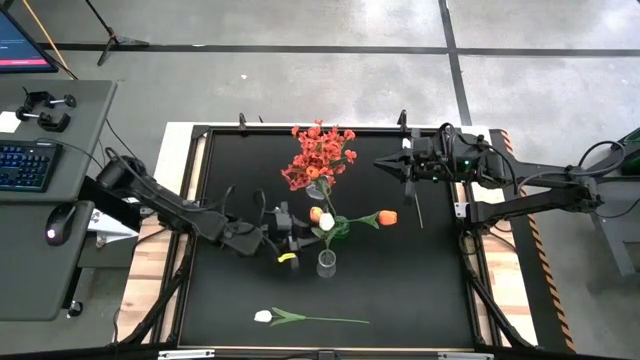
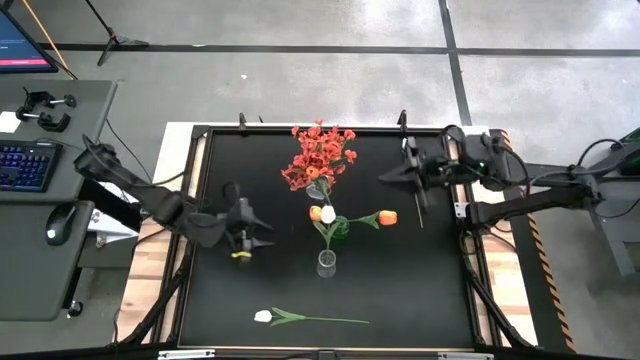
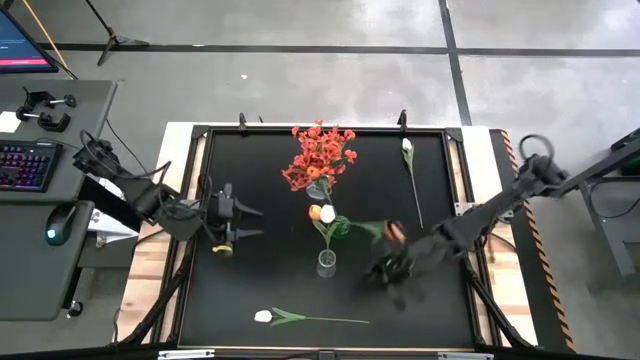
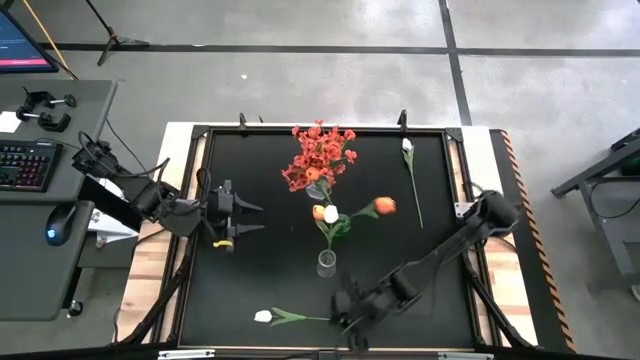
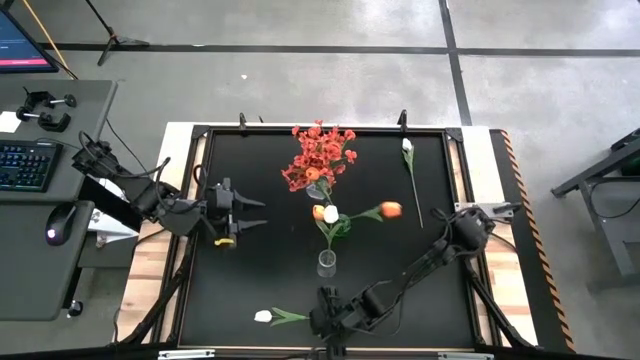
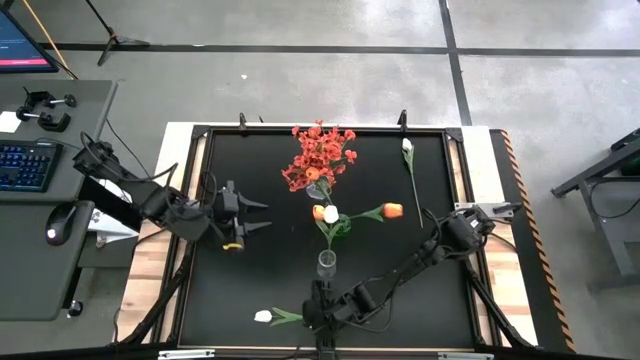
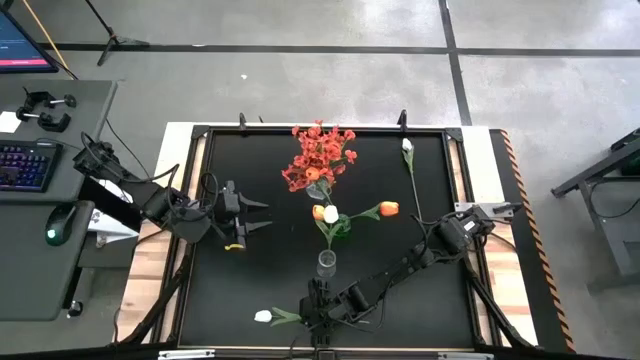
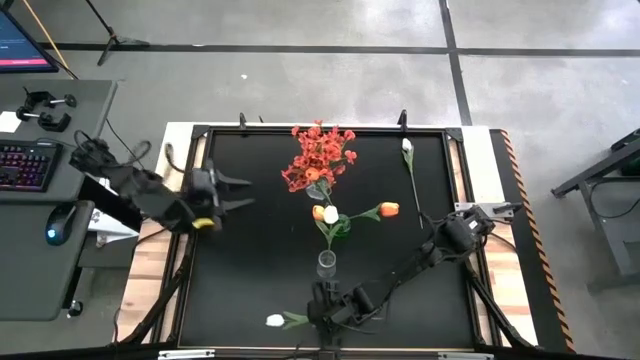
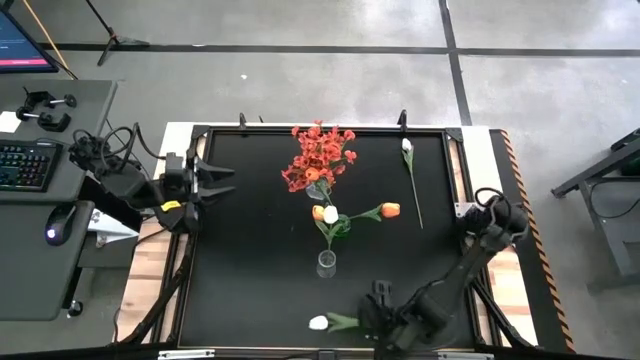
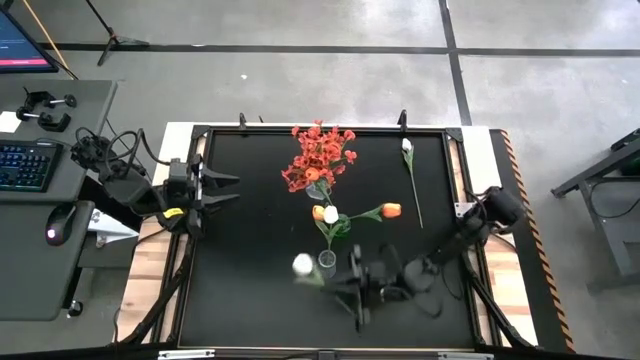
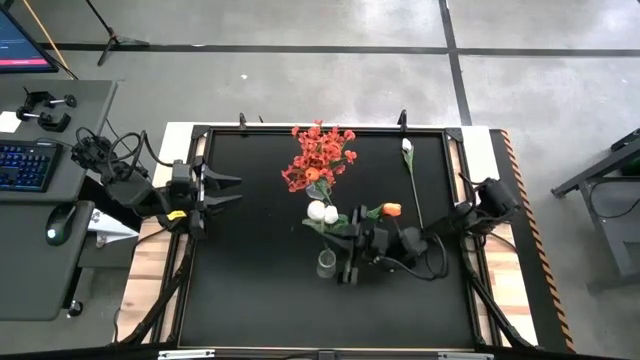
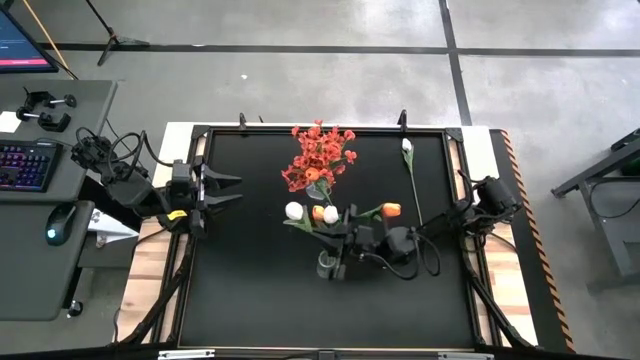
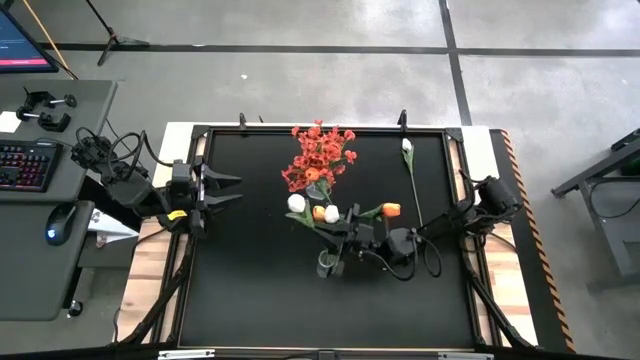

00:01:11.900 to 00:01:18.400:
Task: Sort flowers into vase by color
Put the bottom white tulip into bottom transparent flower vase

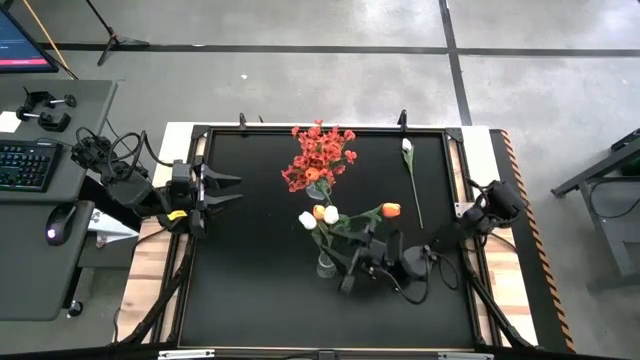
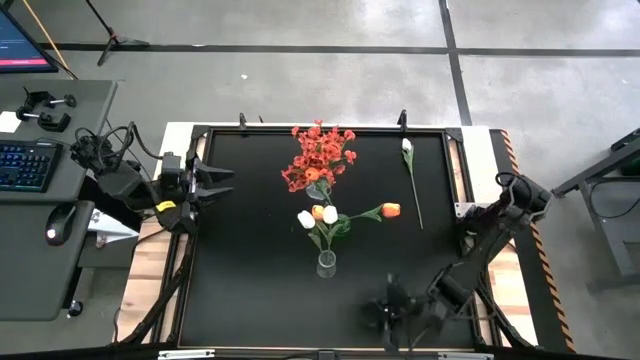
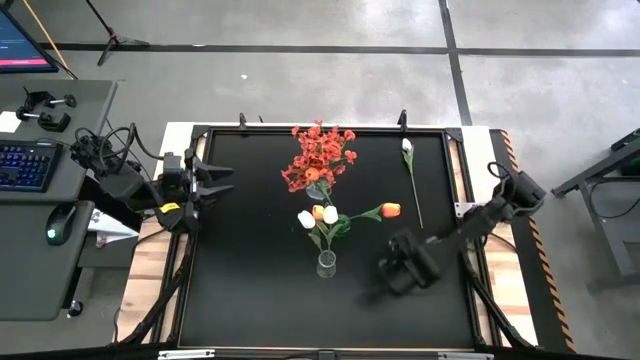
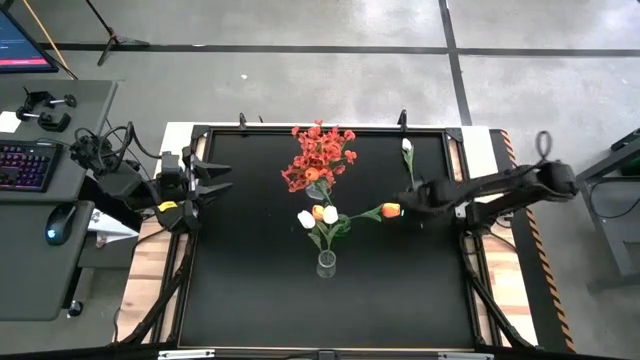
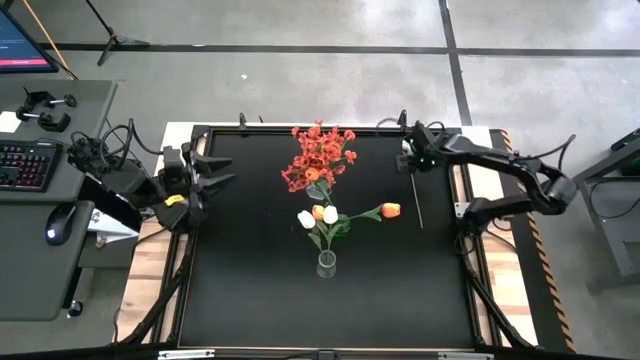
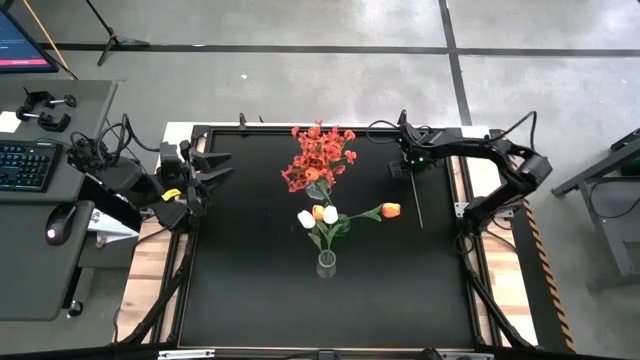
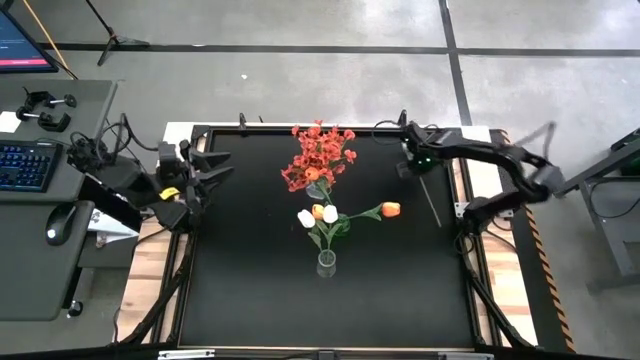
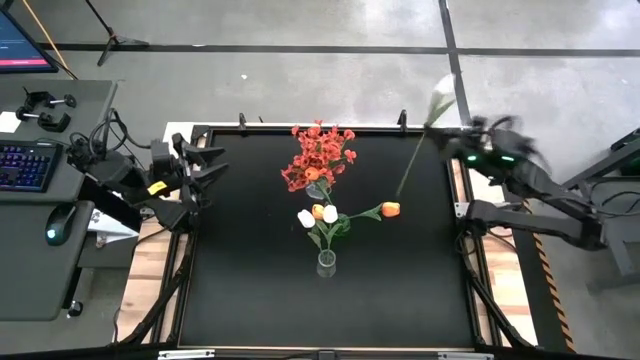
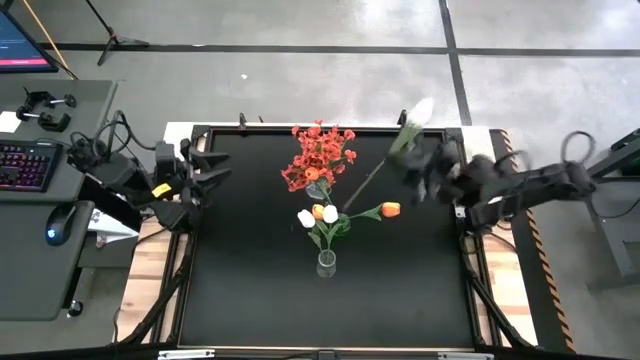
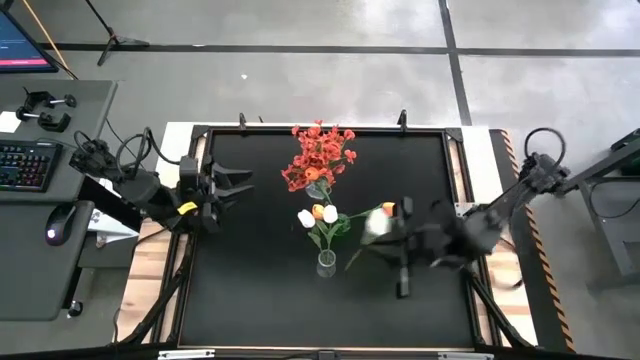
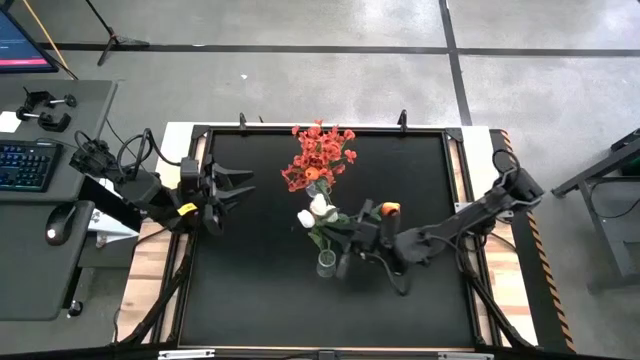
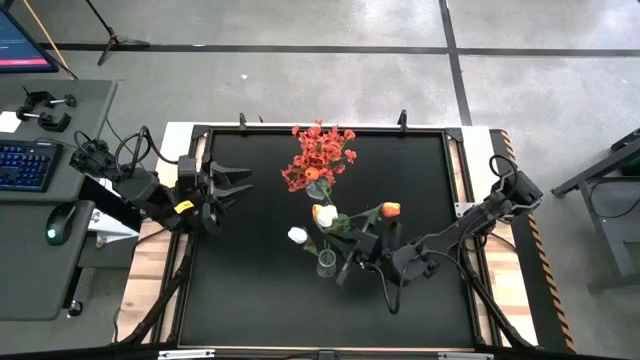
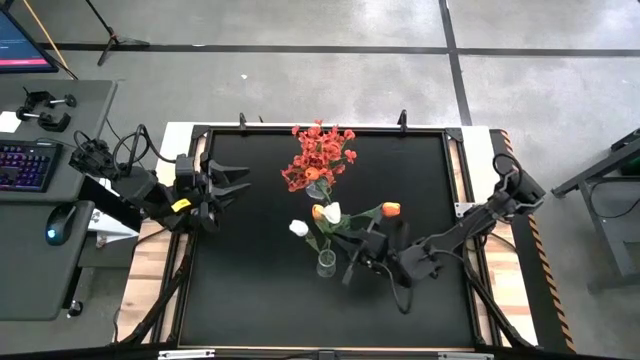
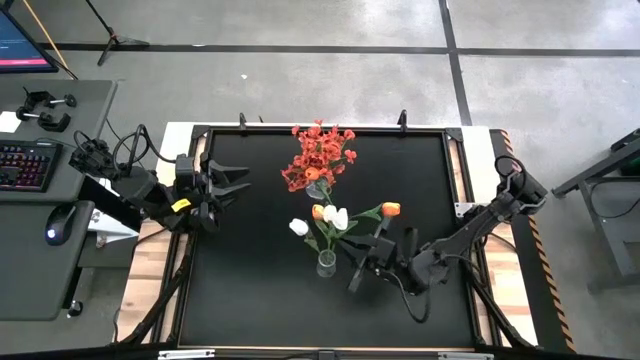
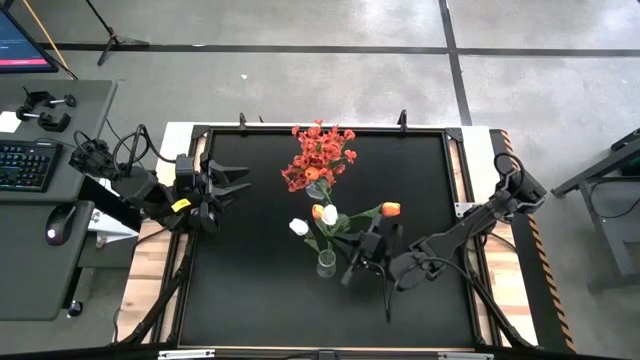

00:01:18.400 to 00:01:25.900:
Put the white tulip into bottom transparent flower vase

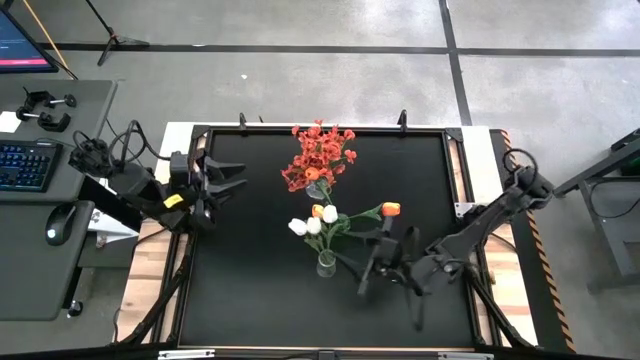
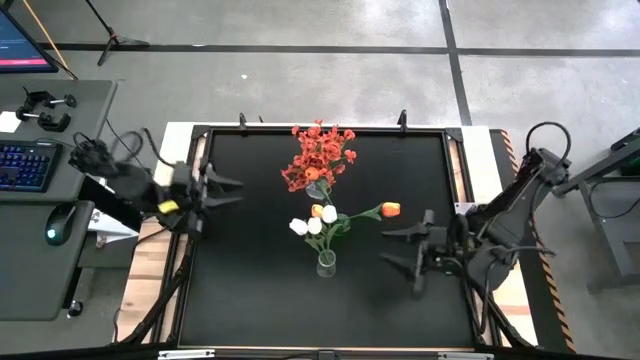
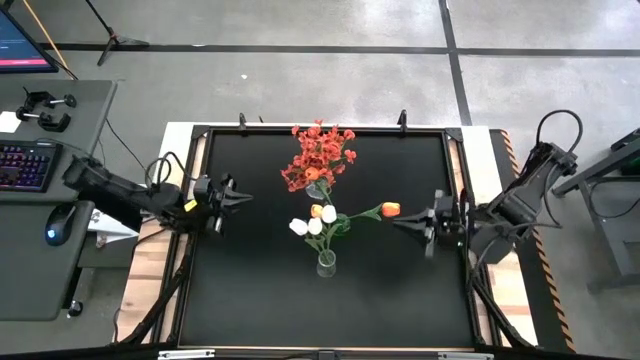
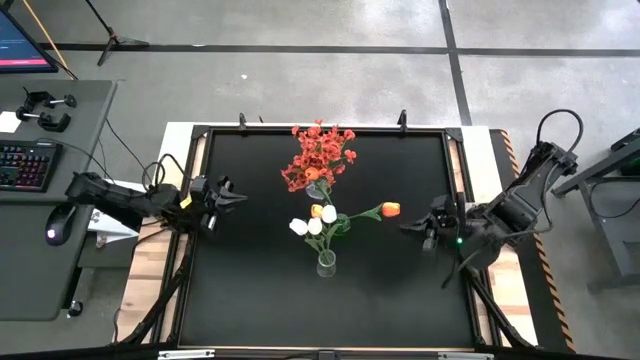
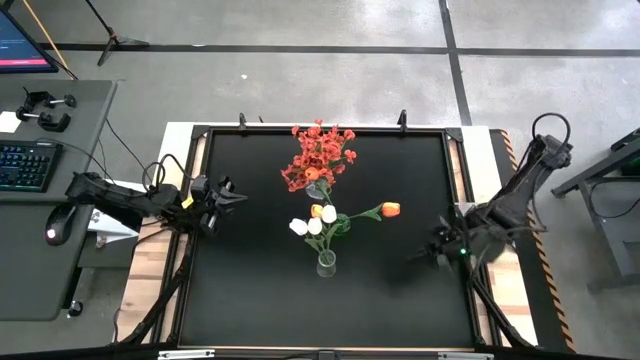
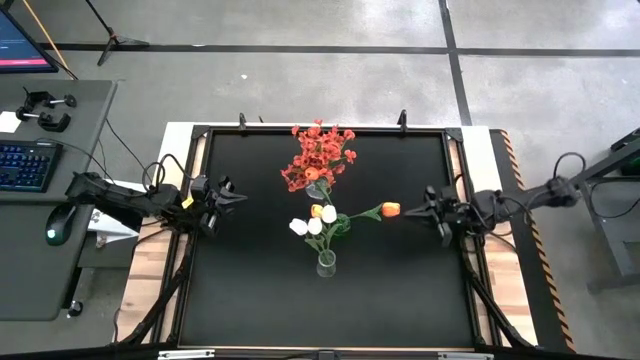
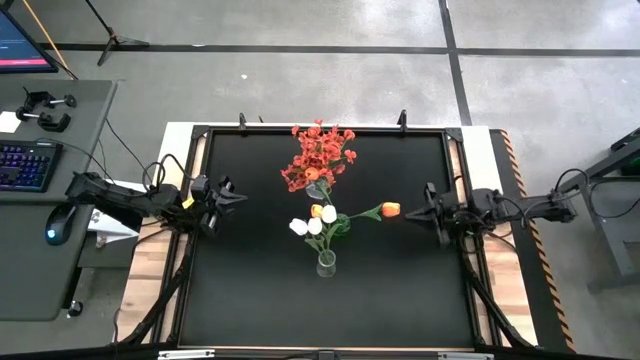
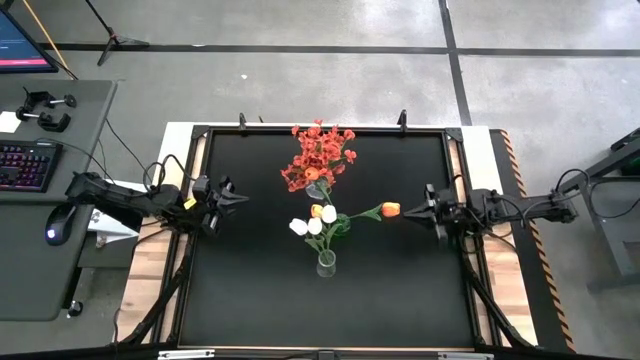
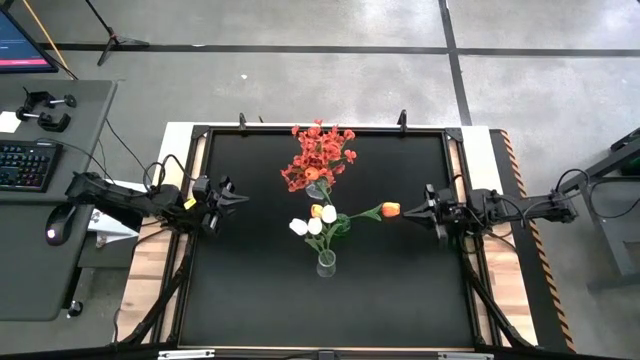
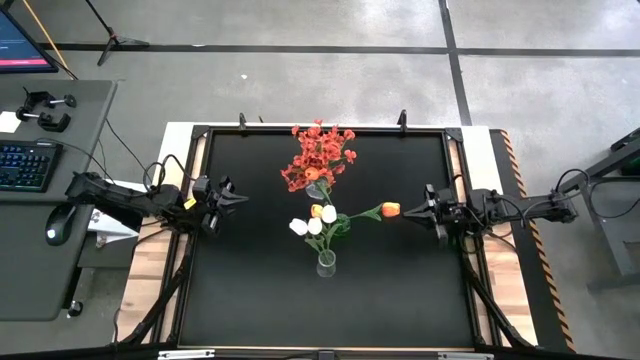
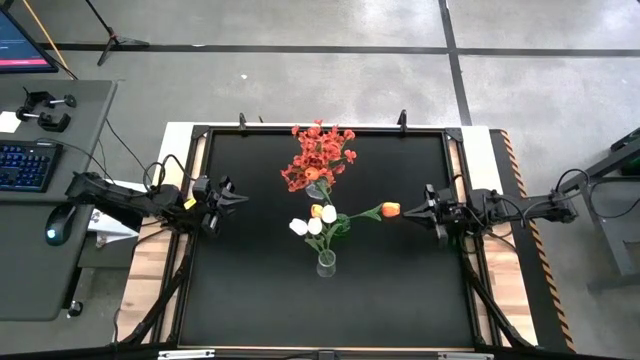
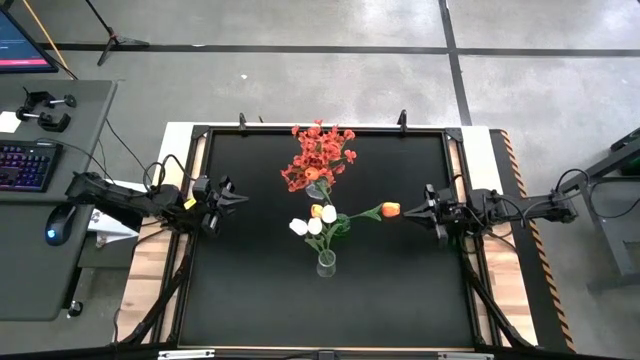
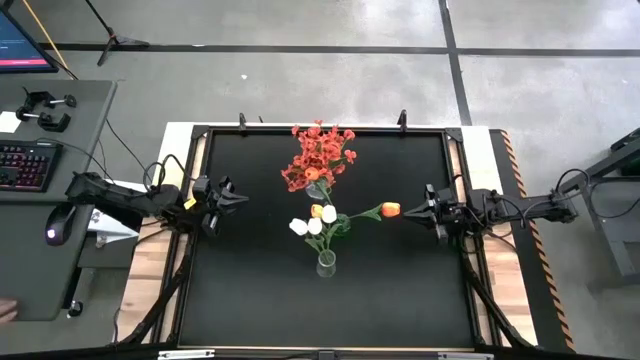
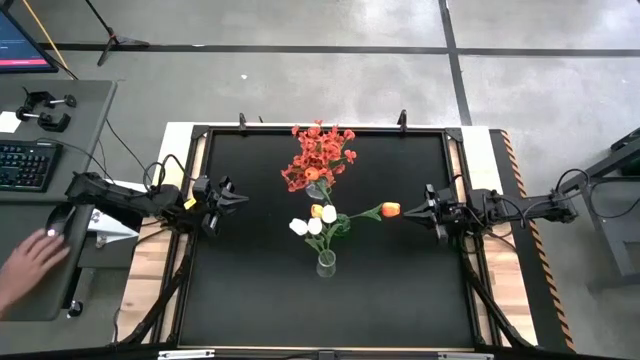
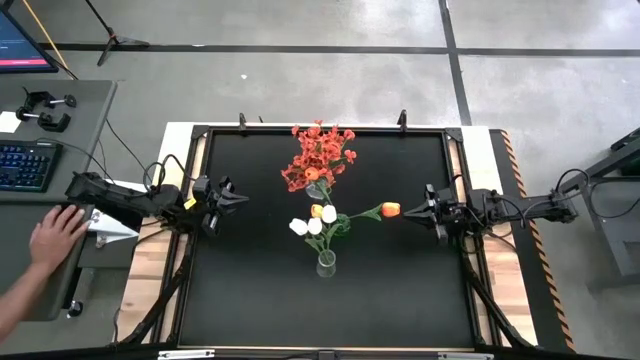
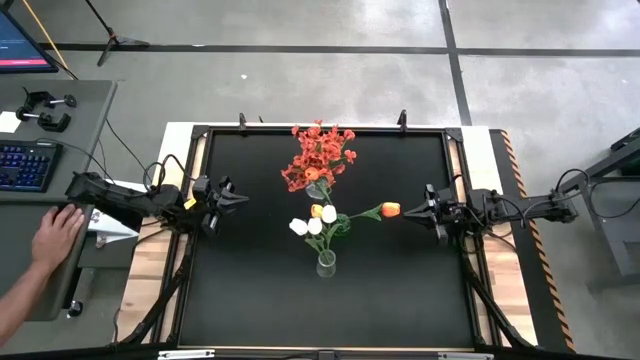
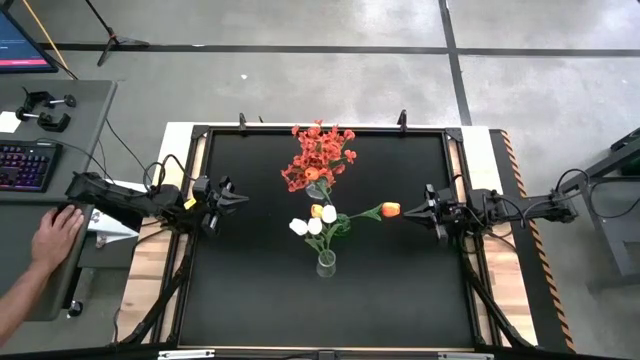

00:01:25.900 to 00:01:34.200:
Return to Home Position
